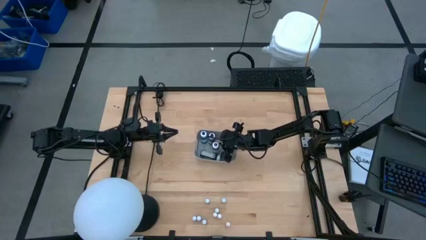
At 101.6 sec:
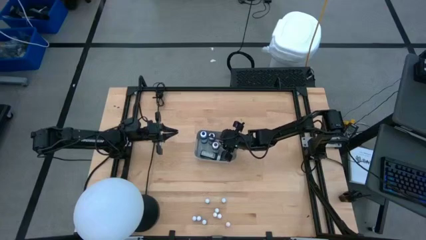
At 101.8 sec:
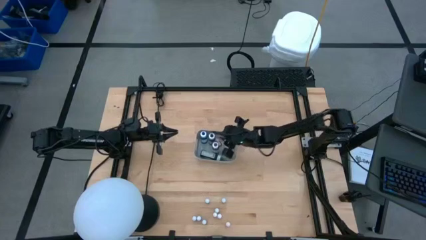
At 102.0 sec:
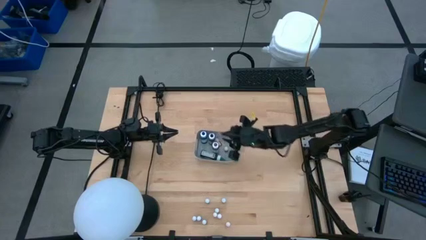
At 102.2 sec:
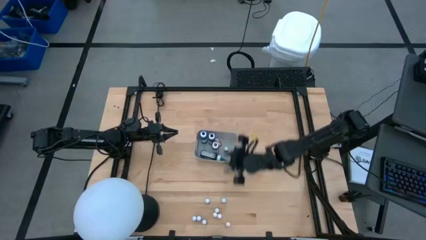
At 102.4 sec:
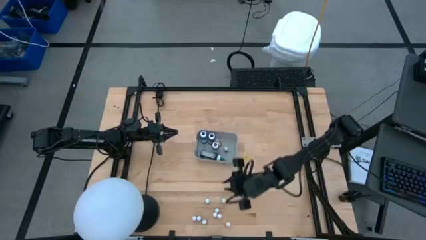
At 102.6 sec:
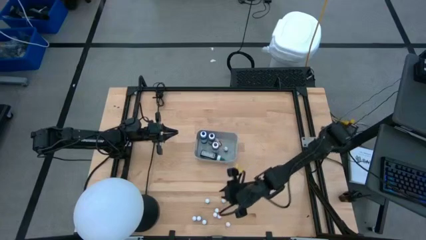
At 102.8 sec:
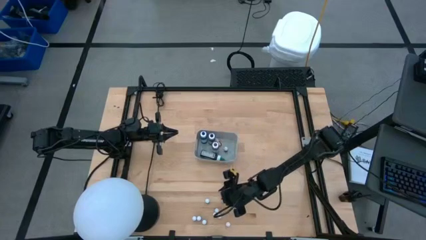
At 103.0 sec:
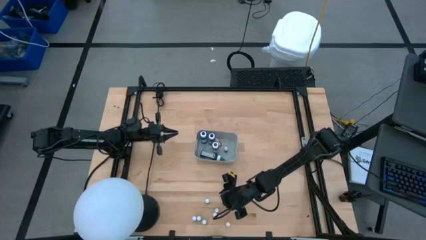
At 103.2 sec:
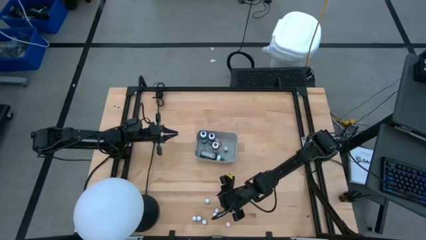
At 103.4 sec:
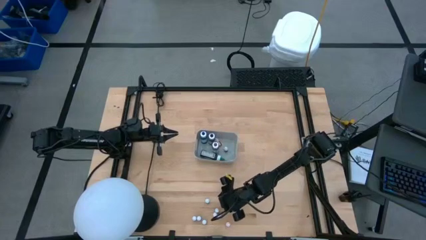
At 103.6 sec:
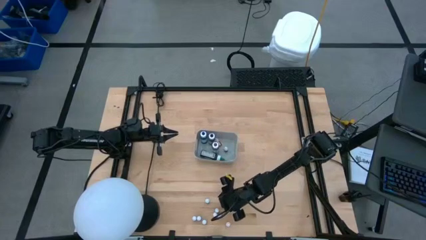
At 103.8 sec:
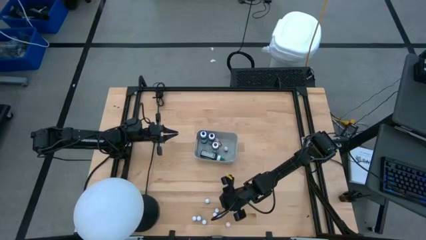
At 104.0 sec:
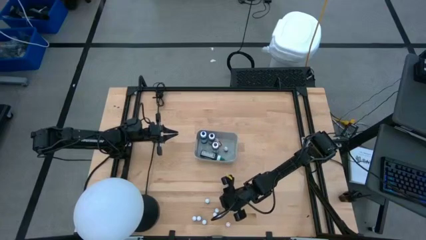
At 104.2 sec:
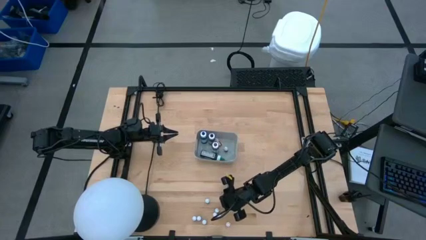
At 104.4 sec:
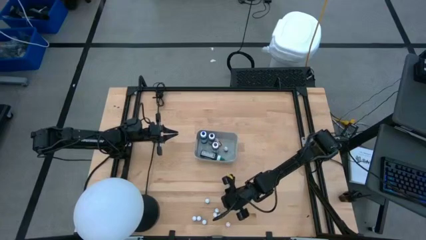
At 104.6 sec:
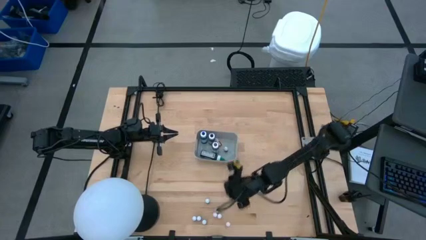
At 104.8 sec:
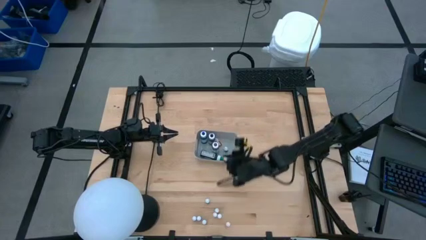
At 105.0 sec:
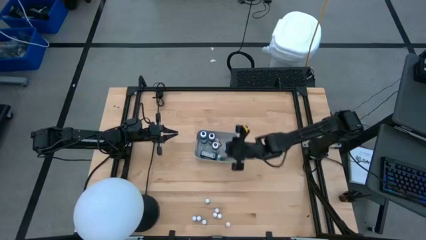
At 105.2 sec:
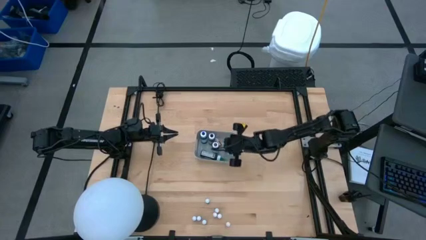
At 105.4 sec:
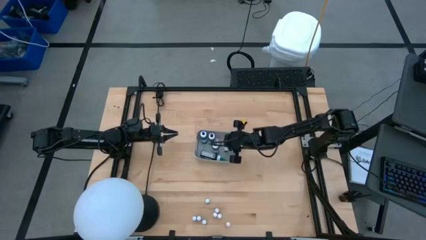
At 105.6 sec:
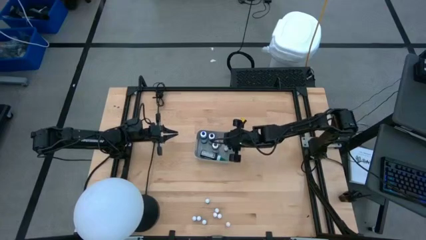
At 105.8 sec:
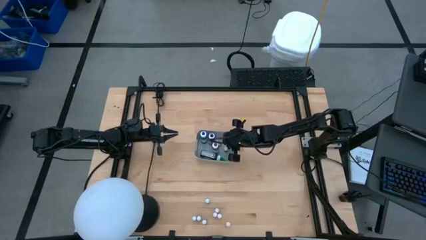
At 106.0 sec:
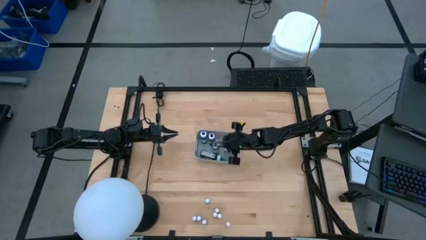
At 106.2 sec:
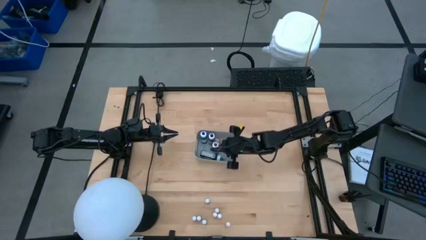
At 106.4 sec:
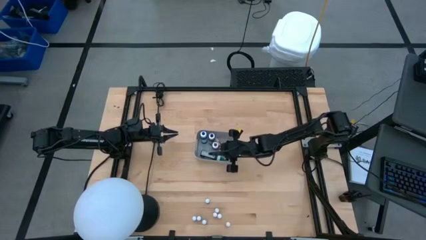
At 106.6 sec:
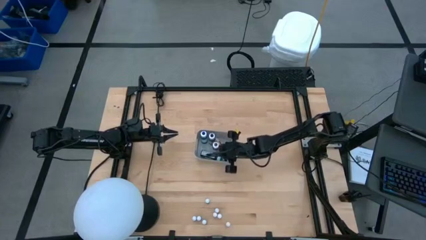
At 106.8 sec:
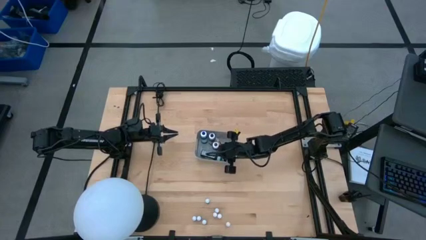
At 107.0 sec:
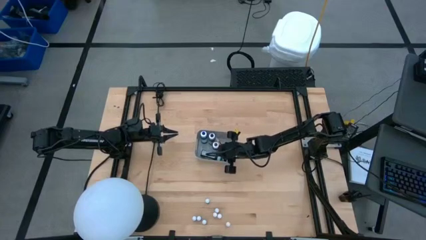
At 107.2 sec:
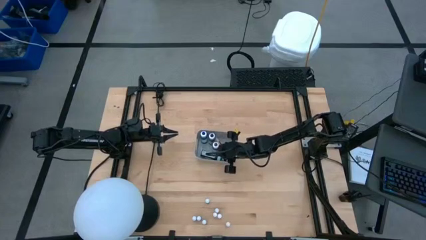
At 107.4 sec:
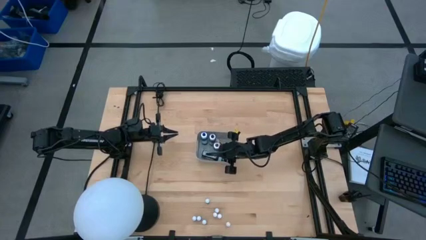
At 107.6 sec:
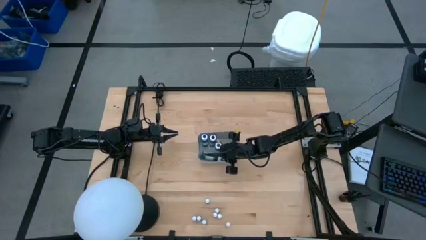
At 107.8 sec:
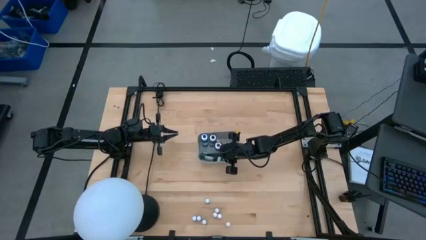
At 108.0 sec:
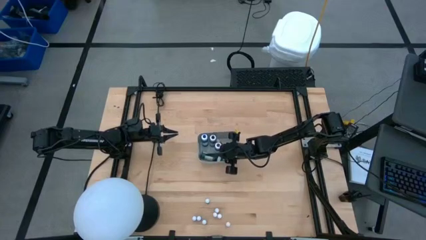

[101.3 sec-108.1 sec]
Task: Pick & Place food coloring
Put the small green food coloring bottle into the gray bin

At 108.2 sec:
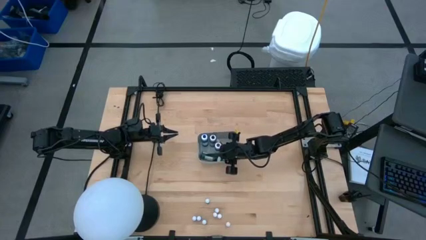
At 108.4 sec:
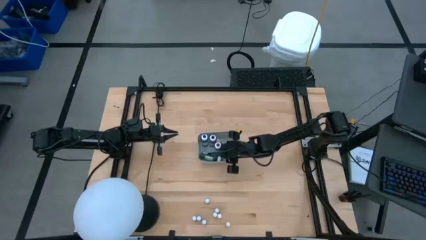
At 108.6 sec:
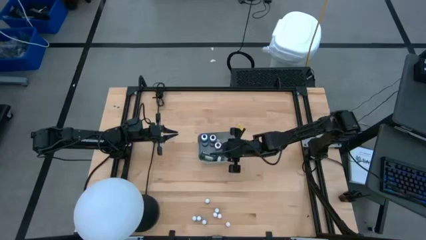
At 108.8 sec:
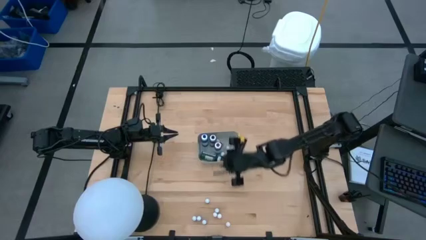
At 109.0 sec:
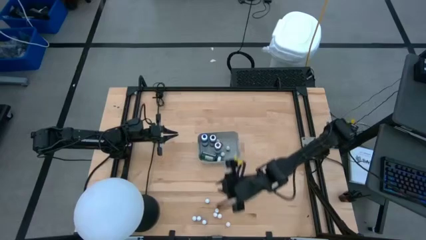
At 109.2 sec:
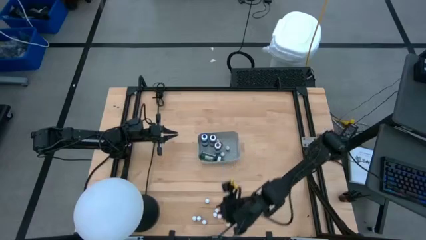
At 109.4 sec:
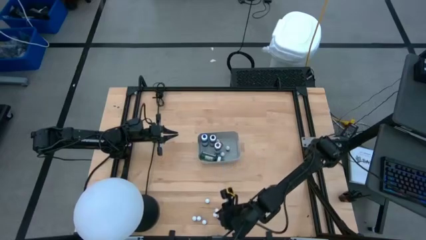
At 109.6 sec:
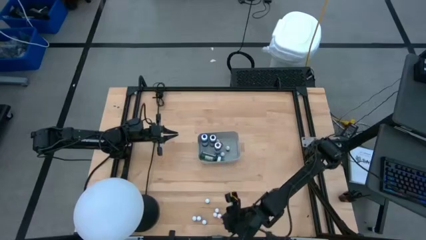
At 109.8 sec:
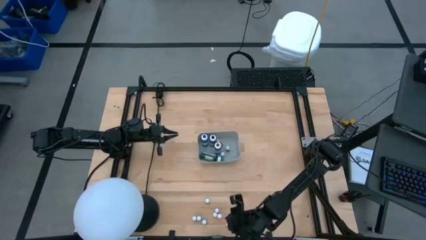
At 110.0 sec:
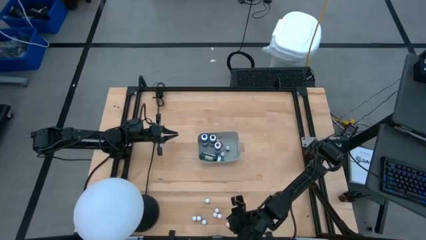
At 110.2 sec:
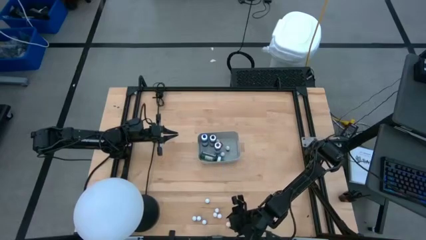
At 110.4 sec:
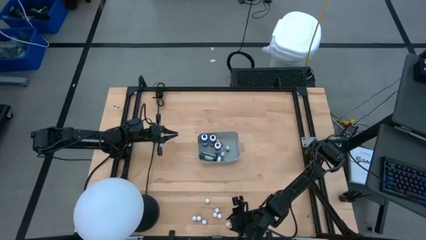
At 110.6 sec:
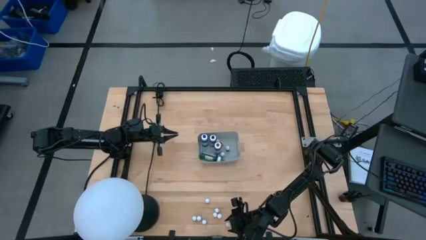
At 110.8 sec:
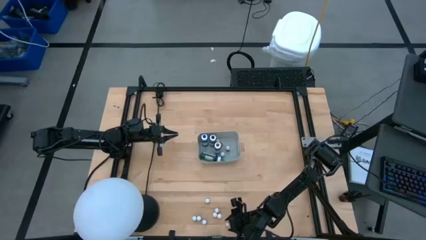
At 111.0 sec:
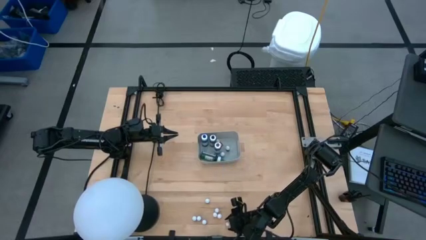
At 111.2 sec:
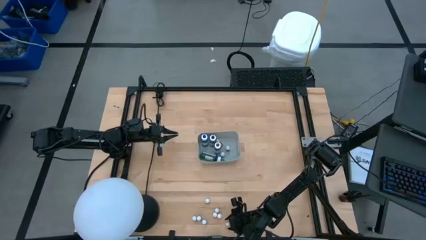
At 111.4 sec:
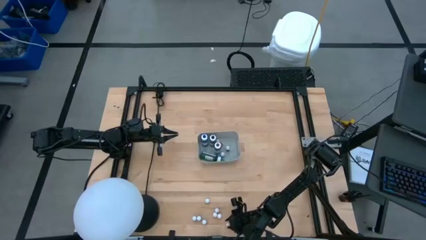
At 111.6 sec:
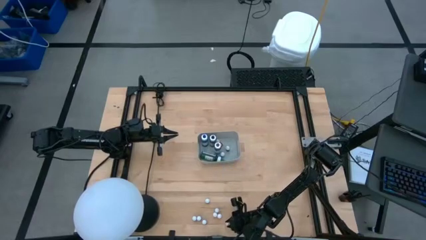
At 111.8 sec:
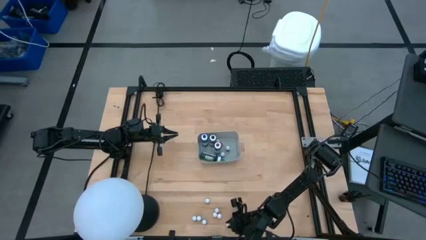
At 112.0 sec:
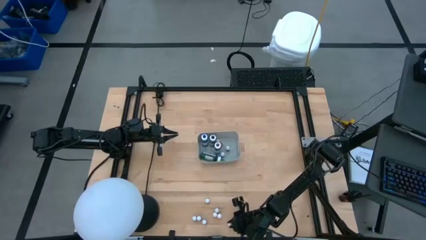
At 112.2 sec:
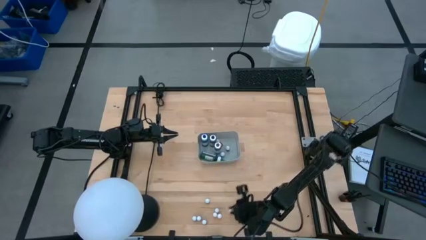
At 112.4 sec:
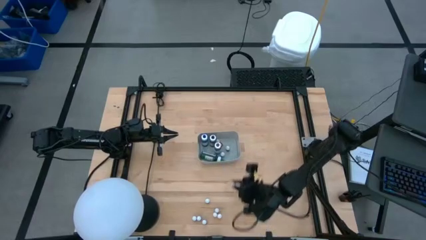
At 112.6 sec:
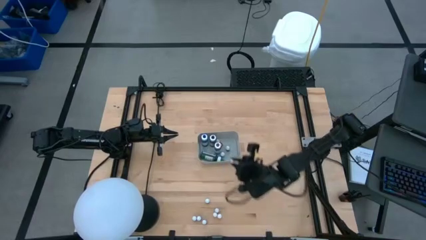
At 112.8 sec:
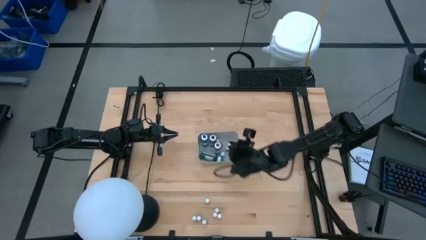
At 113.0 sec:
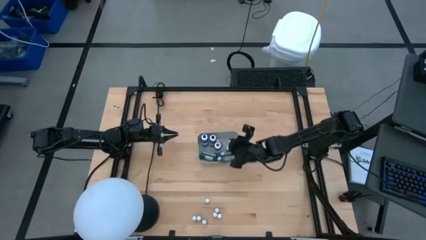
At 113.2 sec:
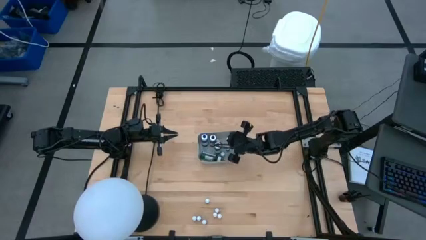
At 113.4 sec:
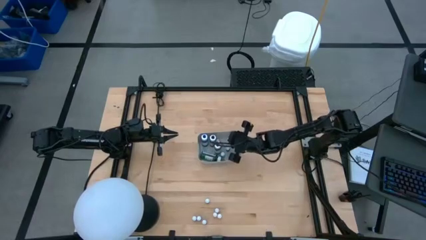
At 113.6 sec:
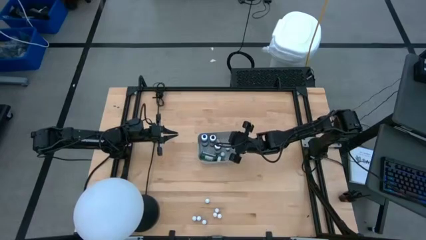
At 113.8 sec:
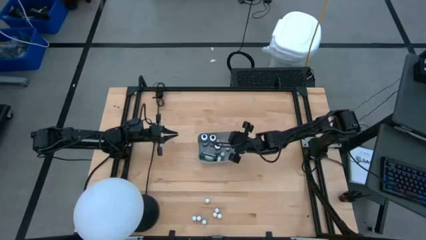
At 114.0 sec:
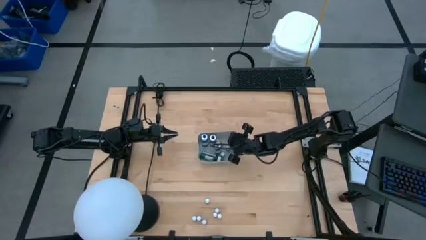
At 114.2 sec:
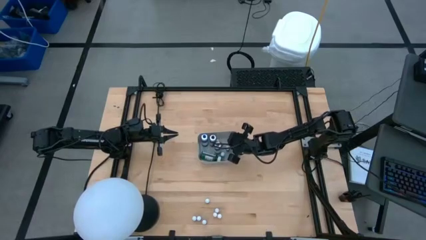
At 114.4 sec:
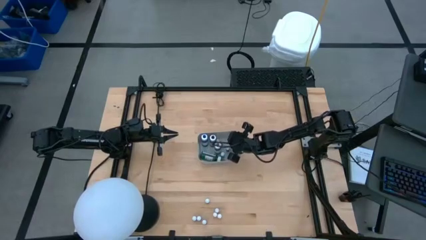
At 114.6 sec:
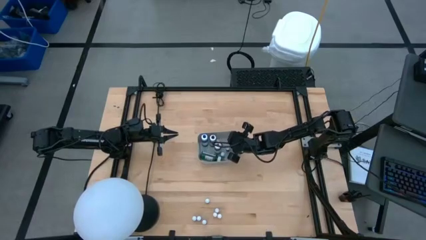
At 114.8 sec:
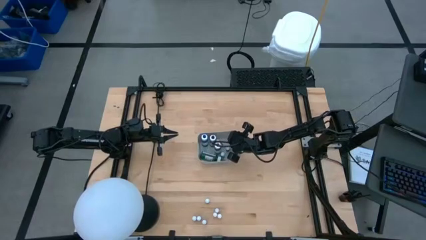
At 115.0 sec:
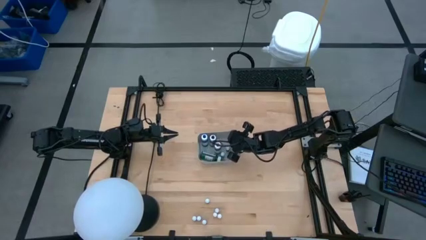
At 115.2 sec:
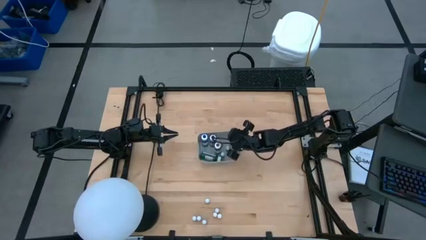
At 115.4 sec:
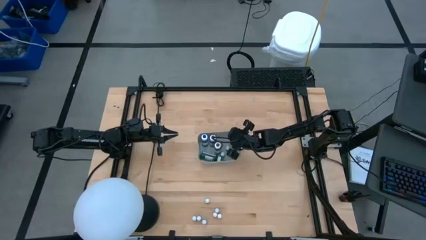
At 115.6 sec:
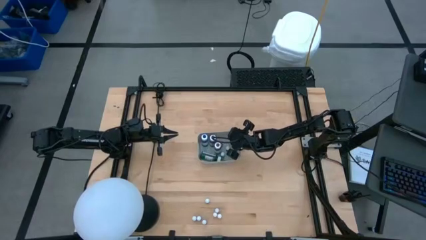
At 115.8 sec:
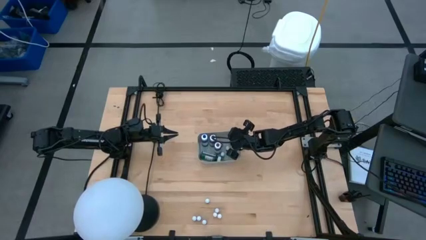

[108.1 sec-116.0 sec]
Put the small orange food coloring bottle into the gray bin

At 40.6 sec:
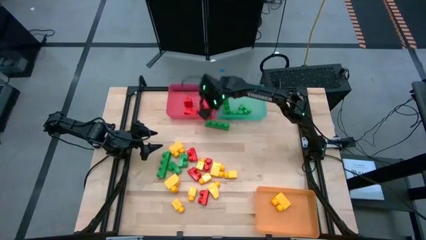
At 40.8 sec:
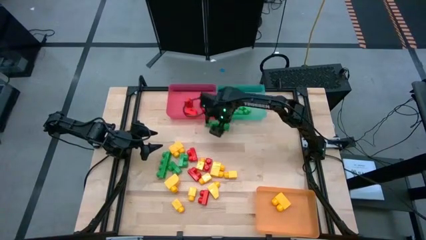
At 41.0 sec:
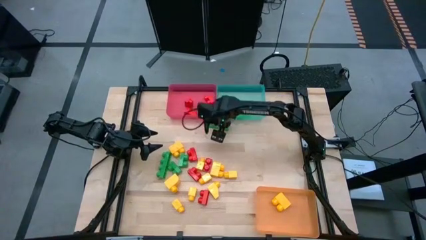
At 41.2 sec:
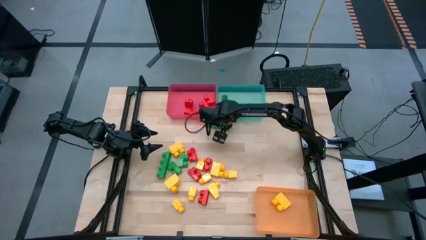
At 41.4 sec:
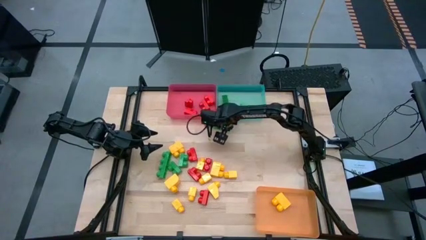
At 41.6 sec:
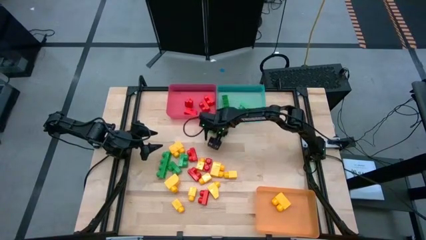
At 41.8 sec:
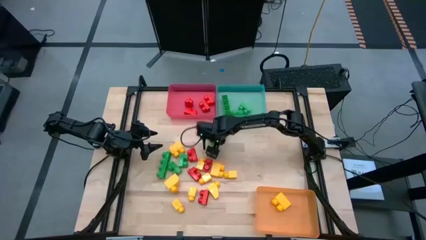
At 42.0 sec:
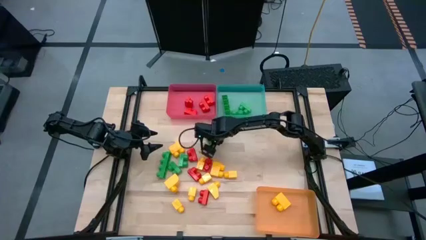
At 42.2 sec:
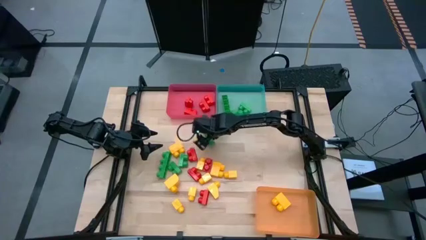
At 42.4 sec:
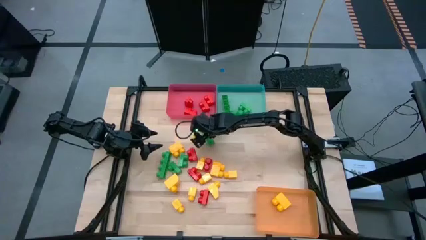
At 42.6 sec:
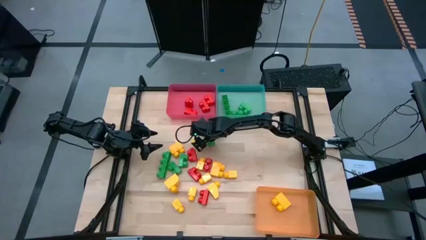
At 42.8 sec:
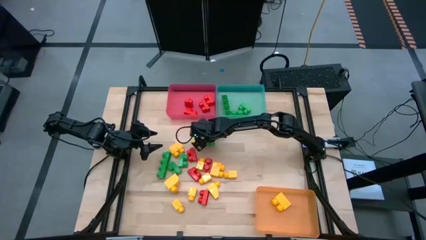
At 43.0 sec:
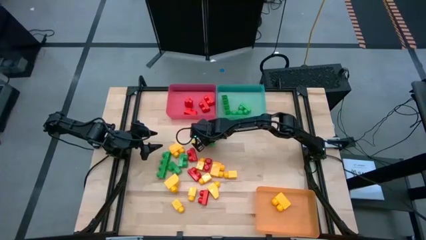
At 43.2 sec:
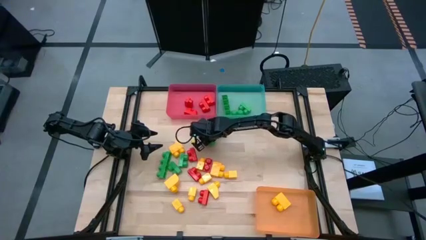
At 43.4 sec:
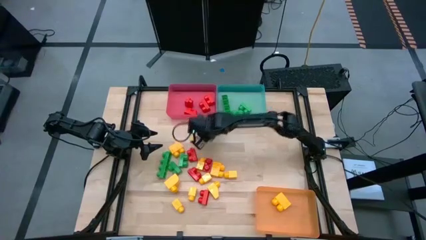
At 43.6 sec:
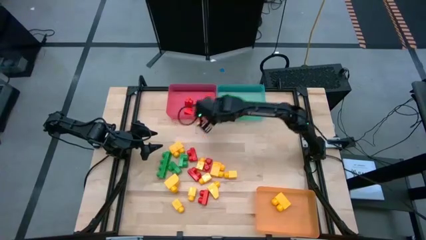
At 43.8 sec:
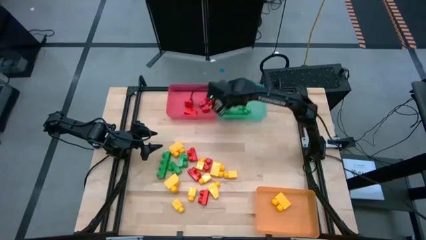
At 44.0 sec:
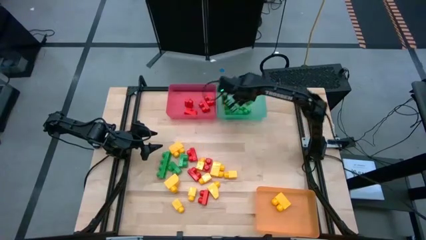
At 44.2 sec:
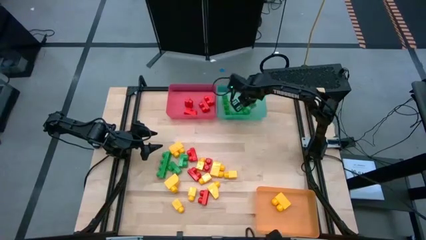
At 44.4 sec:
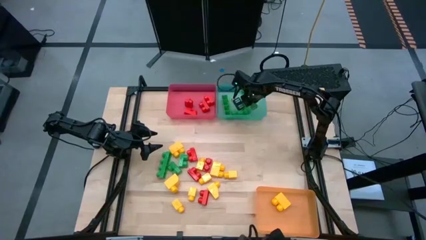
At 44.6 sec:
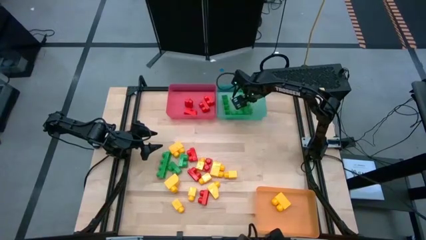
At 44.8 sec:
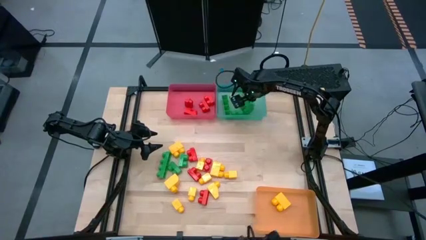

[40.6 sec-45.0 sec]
Task: Sort blocks
Put the green game piece into the green bin
